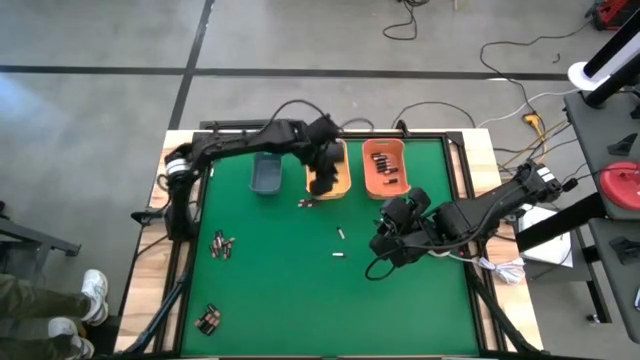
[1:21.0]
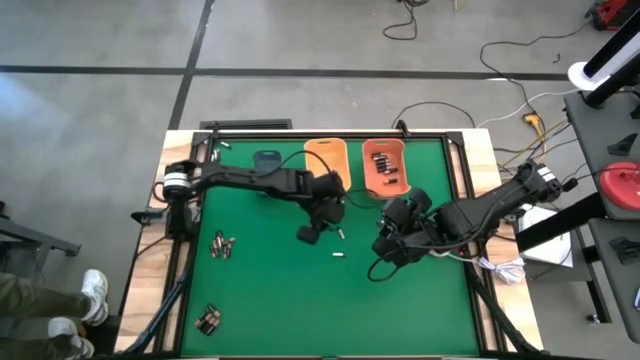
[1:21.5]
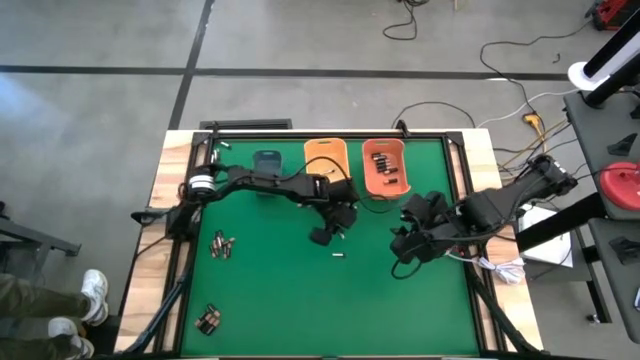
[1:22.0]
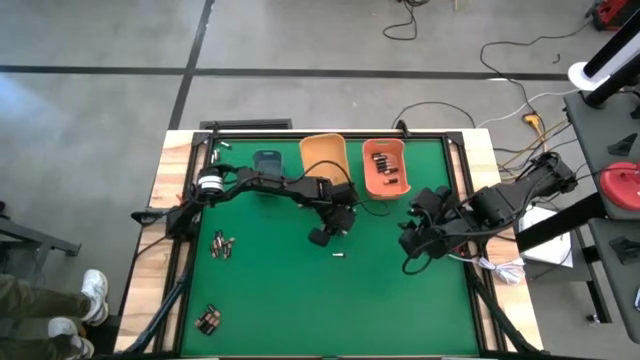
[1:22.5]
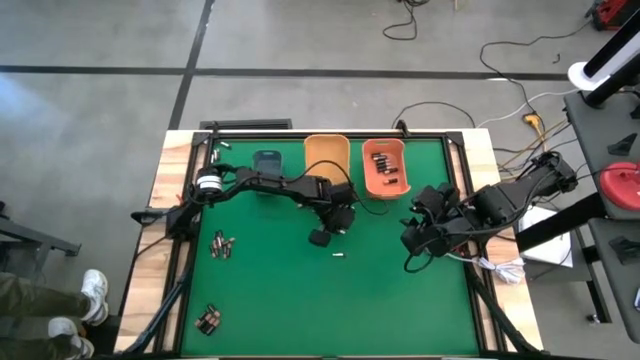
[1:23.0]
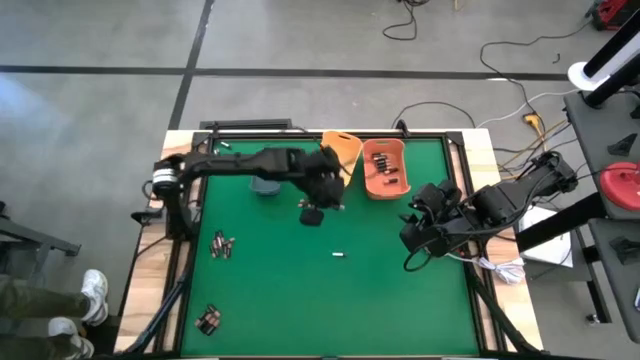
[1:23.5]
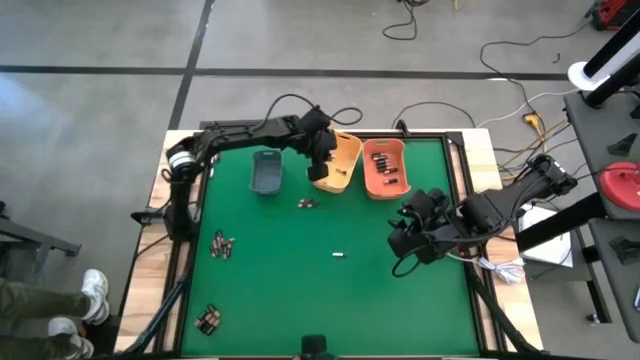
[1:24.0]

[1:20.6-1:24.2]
Task: Sort batteries
Put the silver battery into the yellow bin

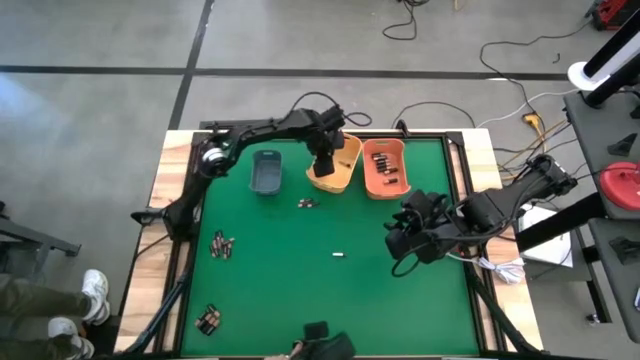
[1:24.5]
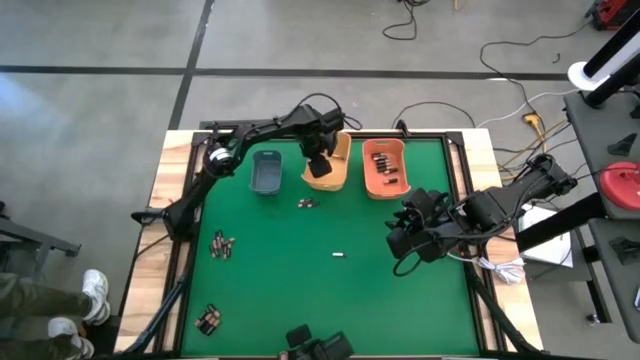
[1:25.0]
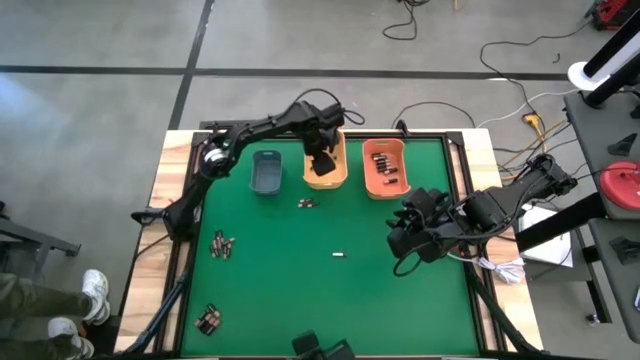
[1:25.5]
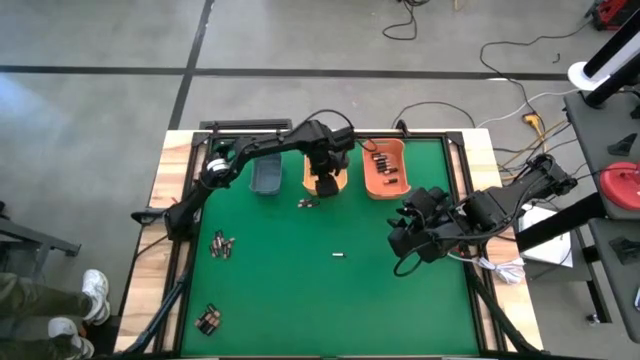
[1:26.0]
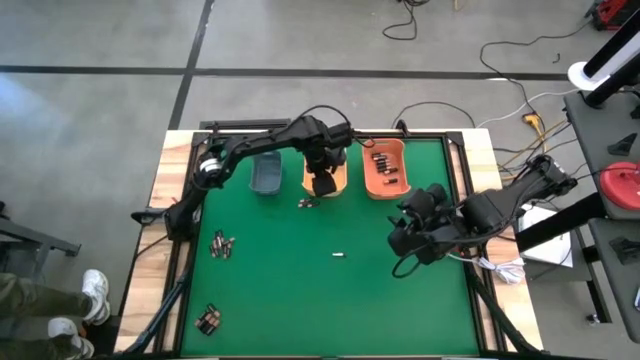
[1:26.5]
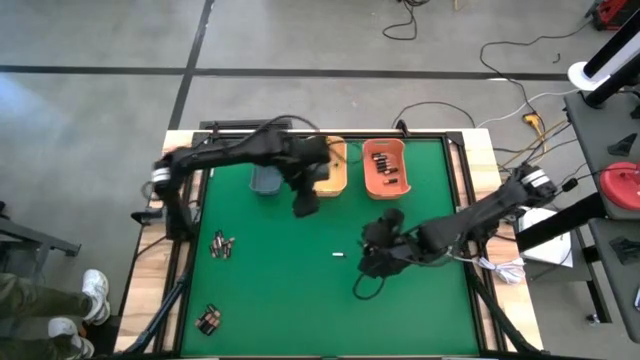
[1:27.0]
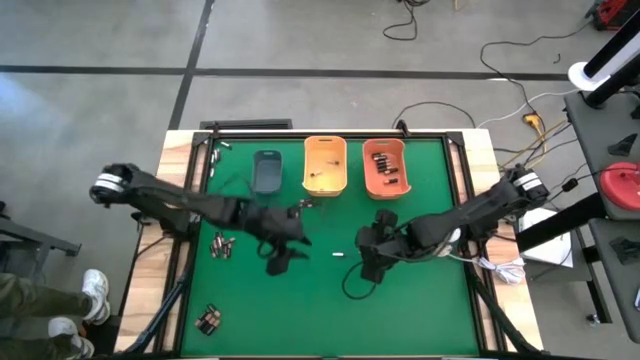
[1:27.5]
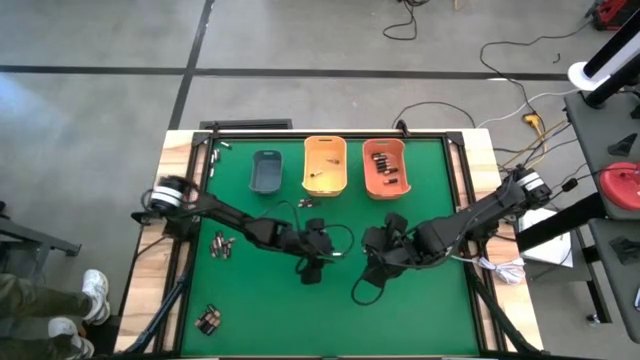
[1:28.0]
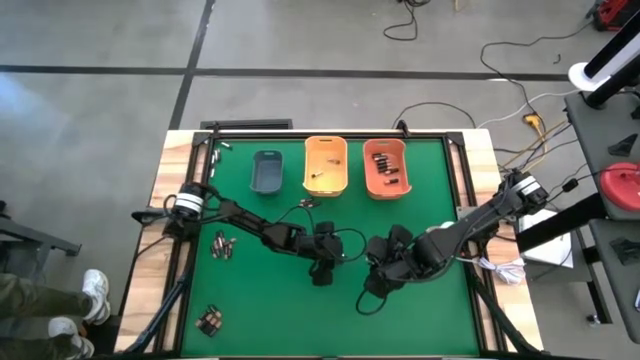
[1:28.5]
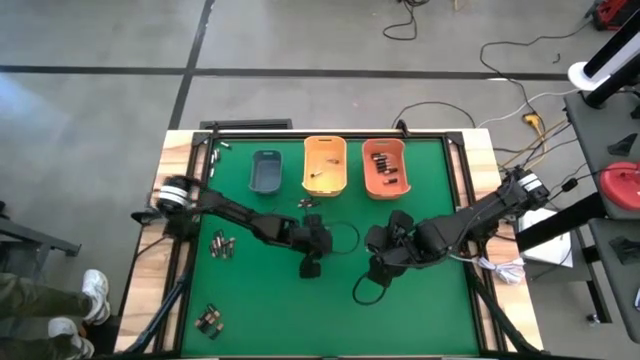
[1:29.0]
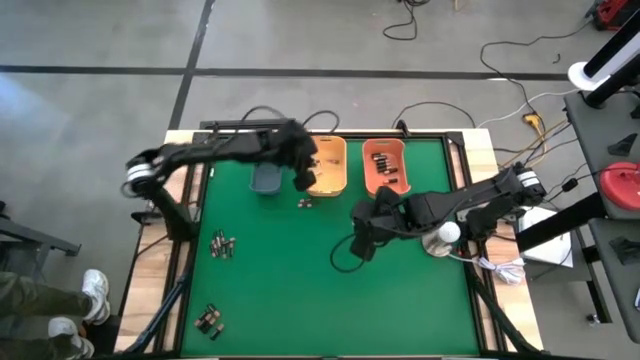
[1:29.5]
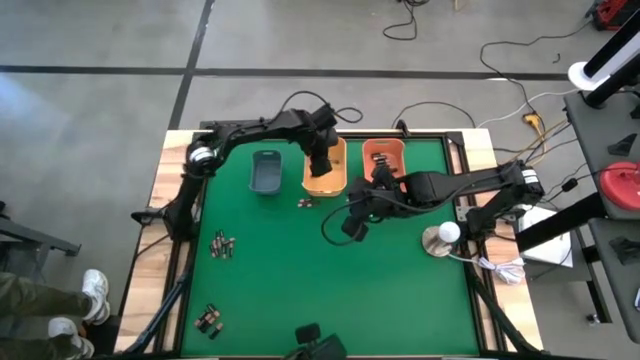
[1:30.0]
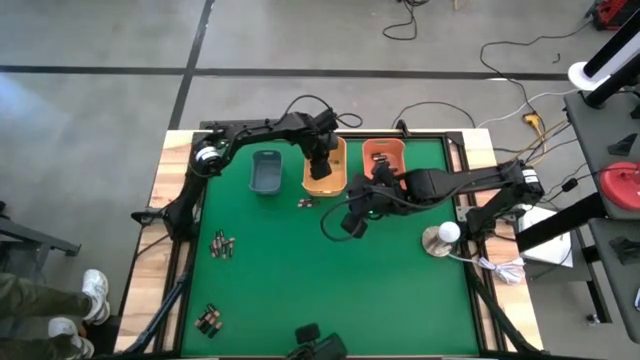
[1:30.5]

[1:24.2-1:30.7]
Put the silver battery into the yellow bin

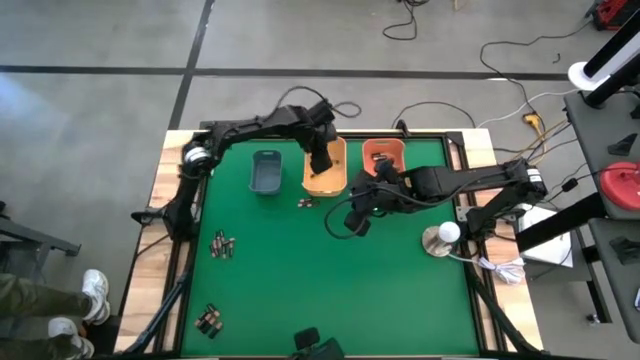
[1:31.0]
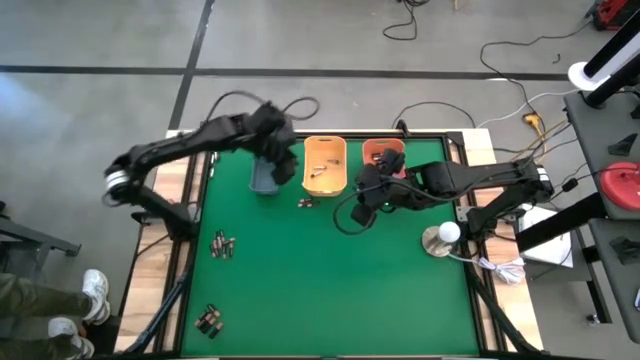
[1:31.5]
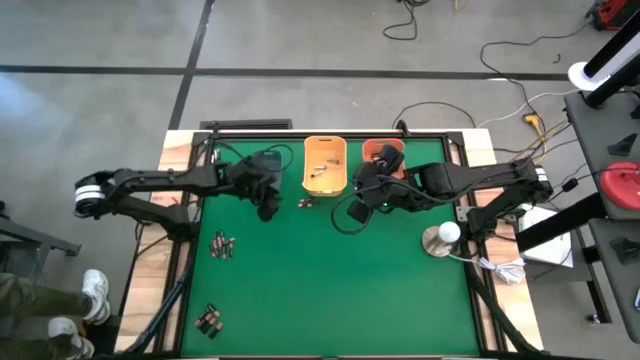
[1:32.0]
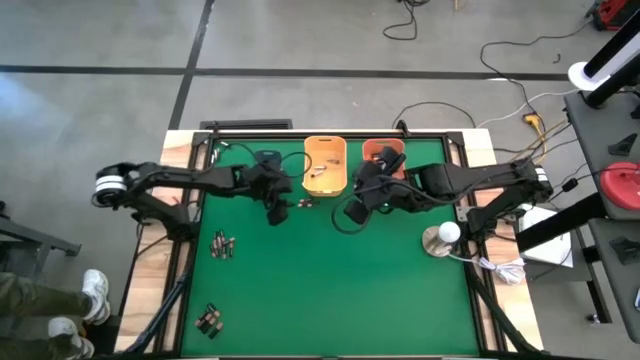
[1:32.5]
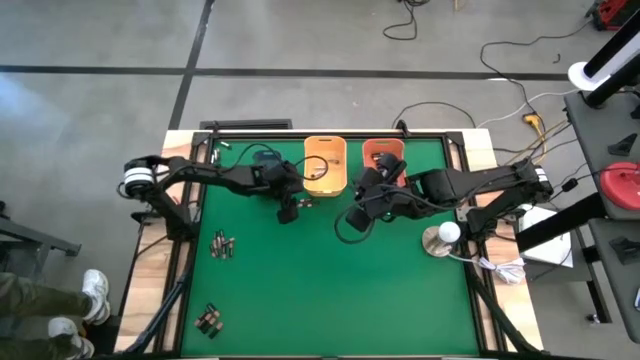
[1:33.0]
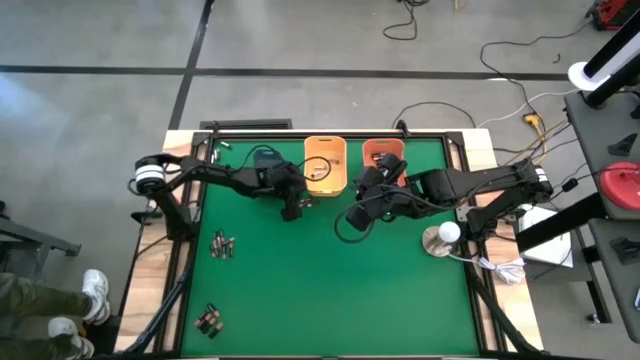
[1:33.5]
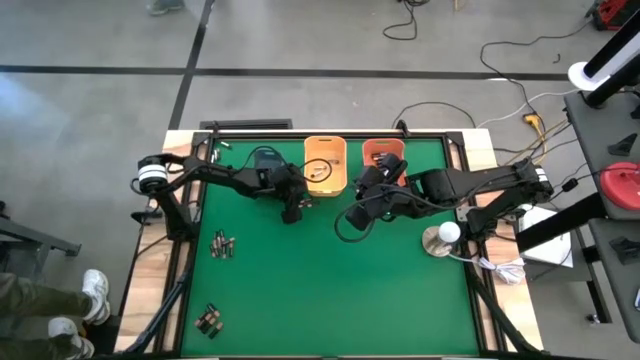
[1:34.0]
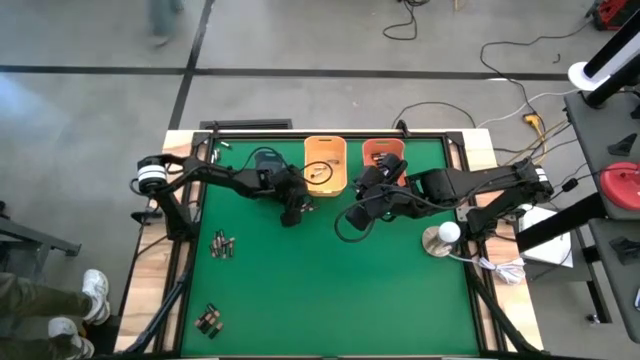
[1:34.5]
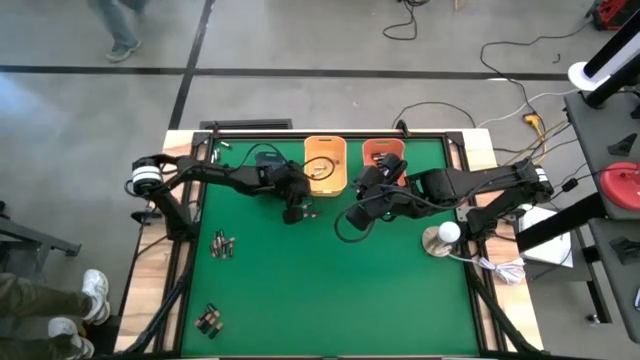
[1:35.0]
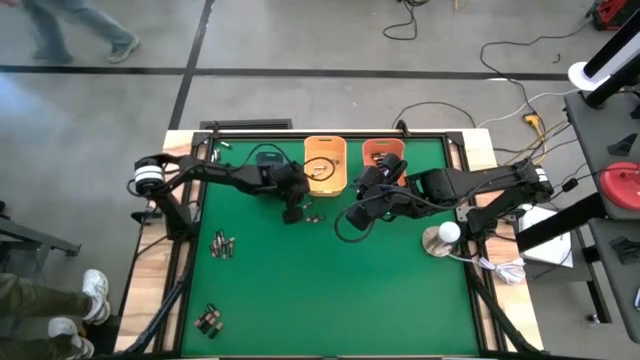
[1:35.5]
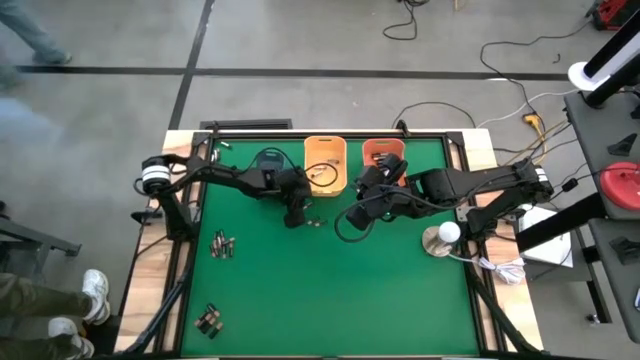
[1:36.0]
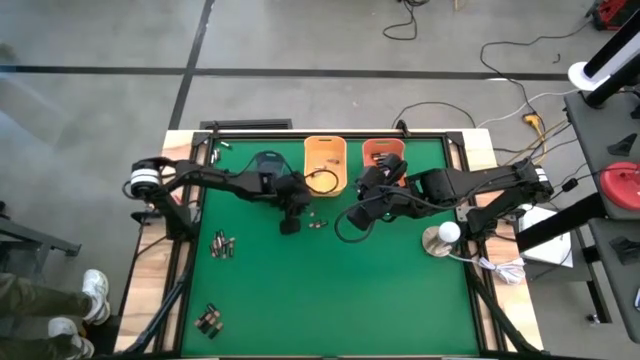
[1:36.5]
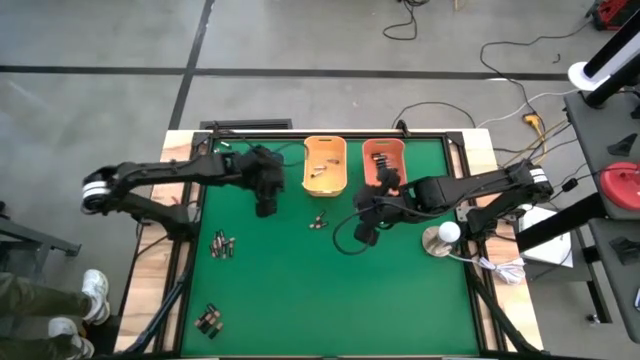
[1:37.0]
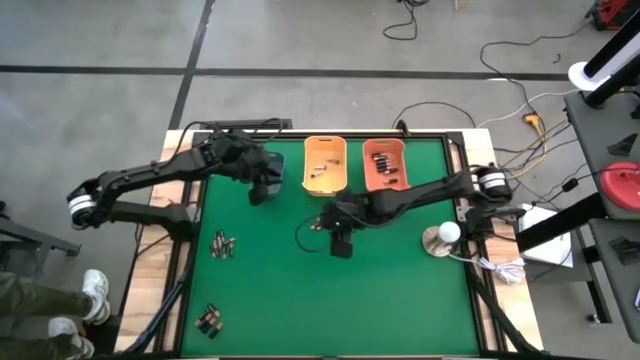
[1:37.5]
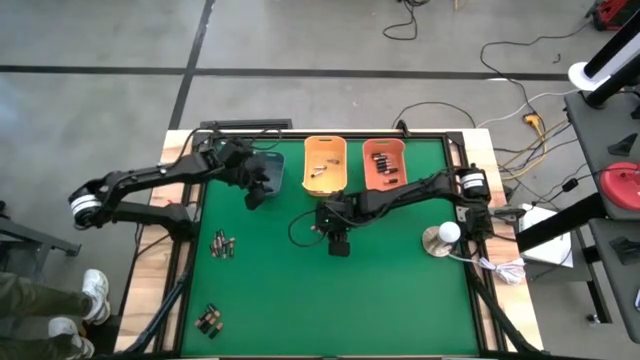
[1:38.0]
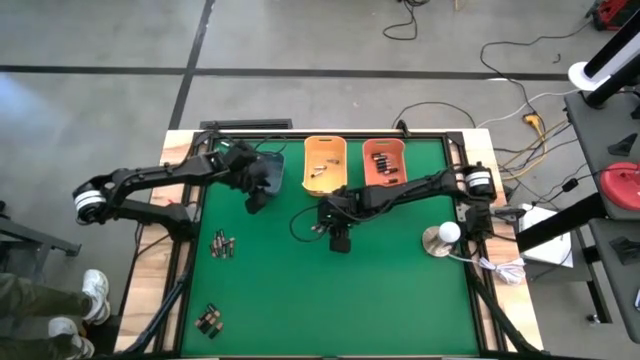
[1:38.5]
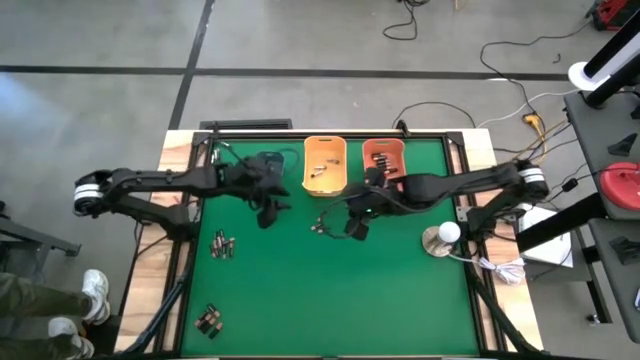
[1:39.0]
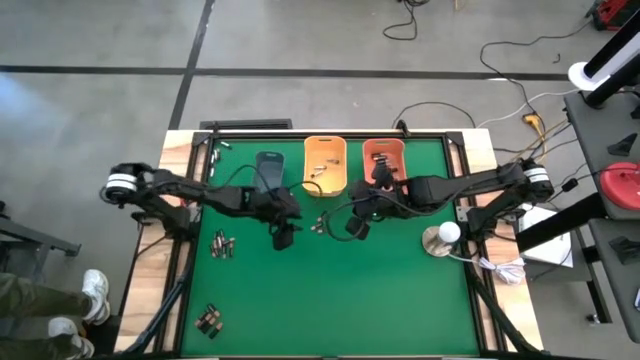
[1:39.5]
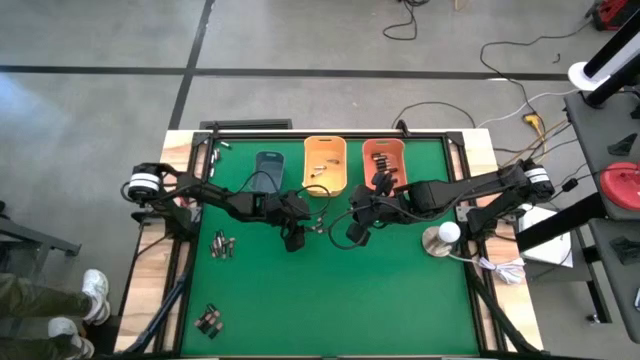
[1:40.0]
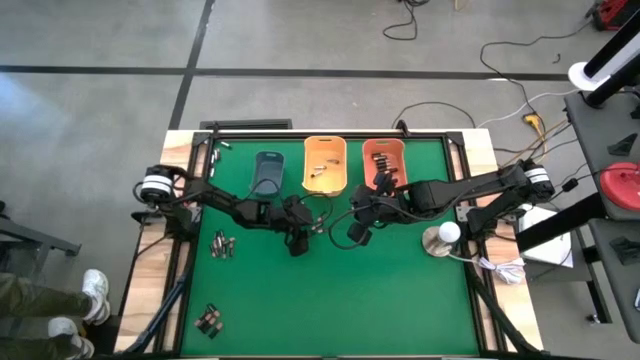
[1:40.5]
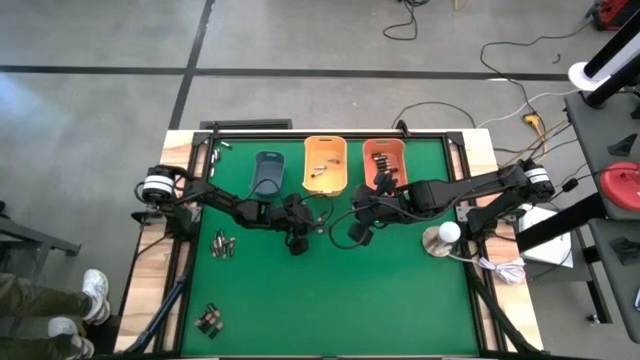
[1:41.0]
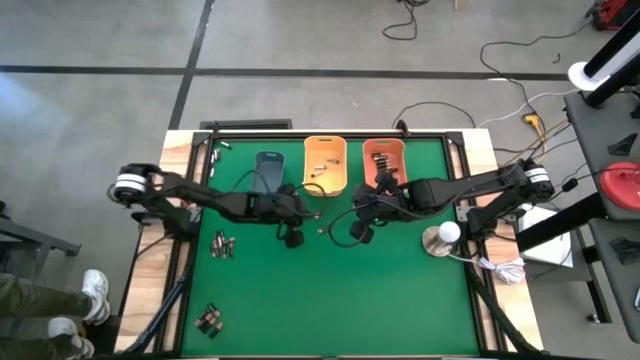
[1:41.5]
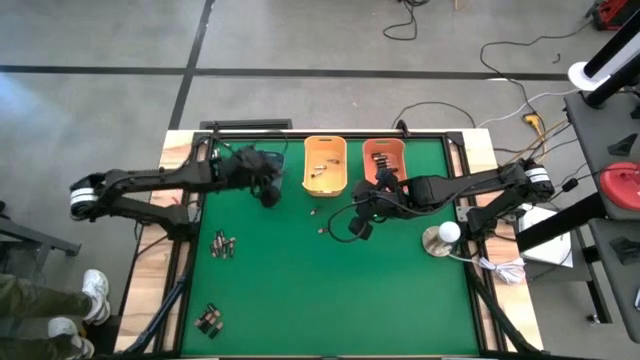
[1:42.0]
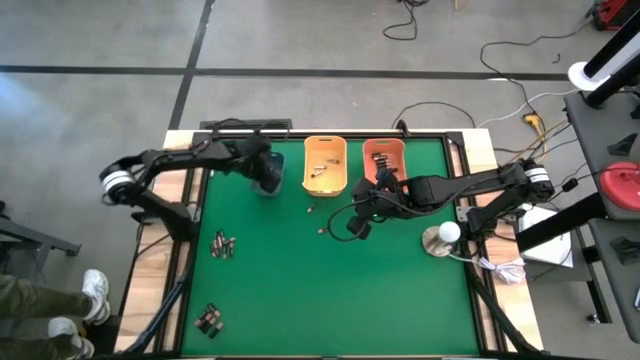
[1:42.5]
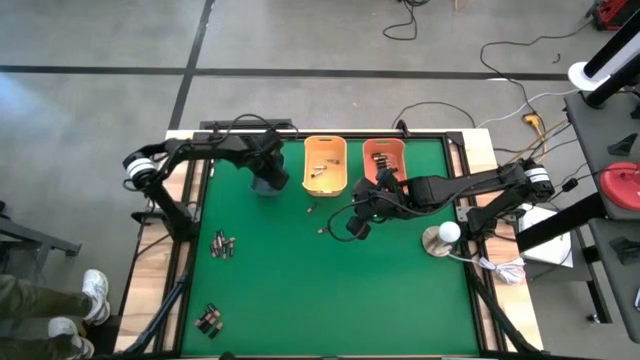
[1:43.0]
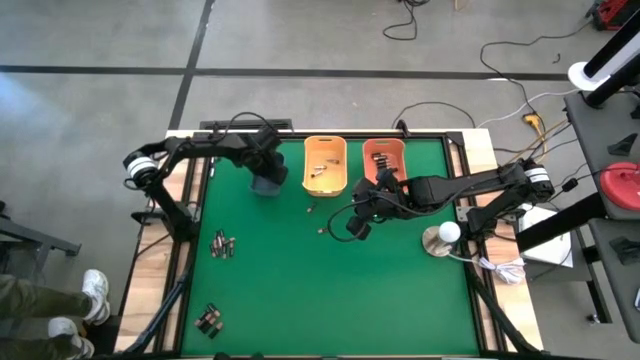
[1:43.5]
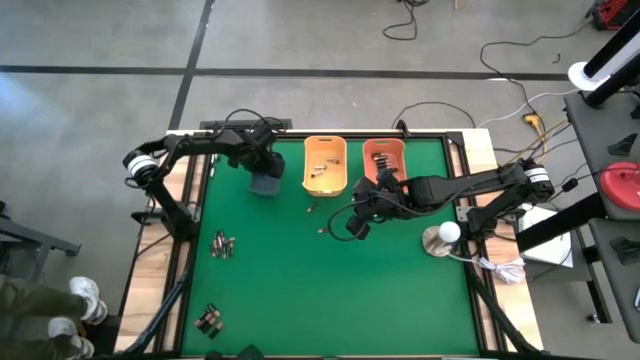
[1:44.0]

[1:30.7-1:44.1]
Put the gold battery into the blue bin
